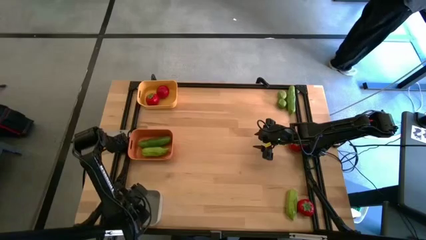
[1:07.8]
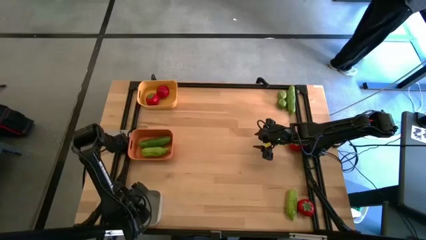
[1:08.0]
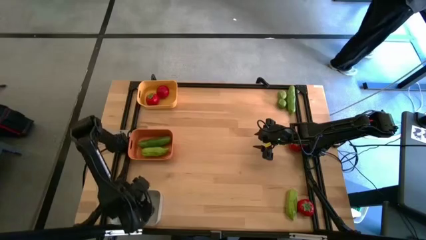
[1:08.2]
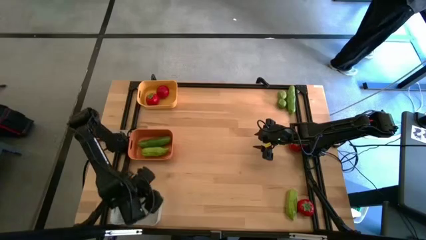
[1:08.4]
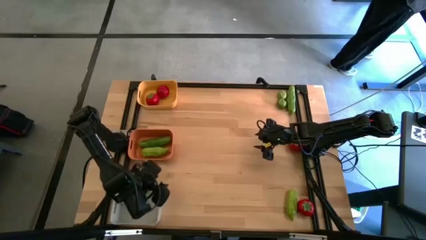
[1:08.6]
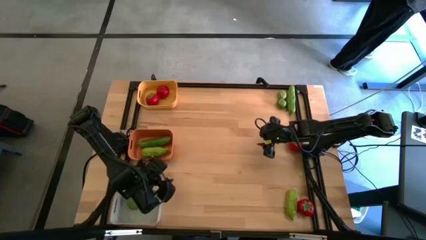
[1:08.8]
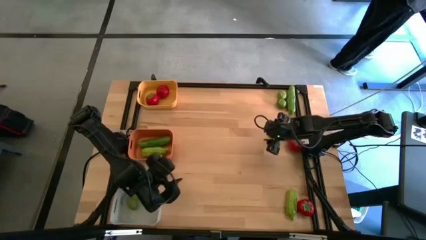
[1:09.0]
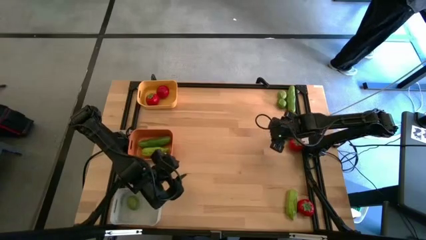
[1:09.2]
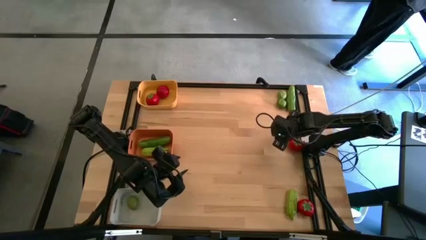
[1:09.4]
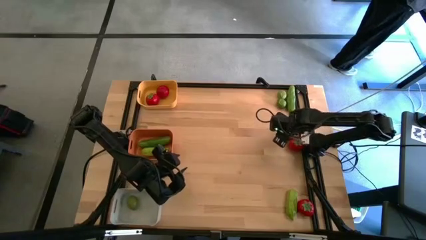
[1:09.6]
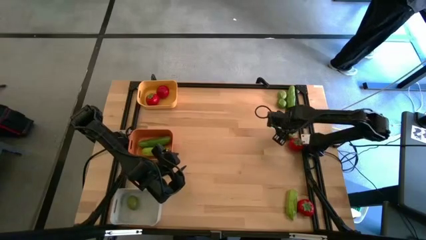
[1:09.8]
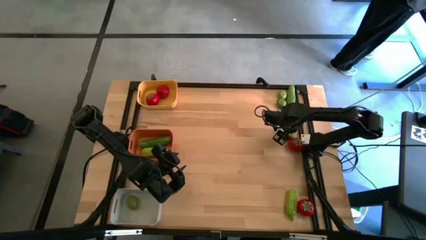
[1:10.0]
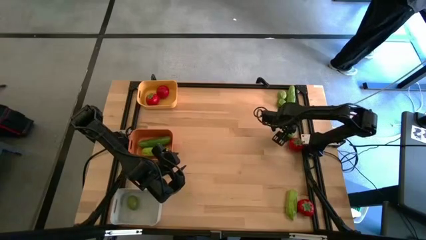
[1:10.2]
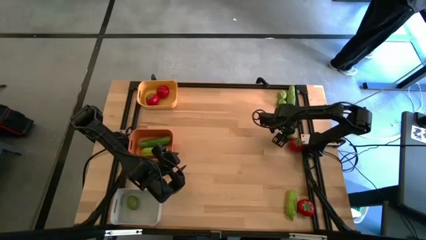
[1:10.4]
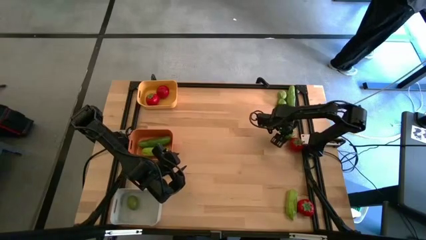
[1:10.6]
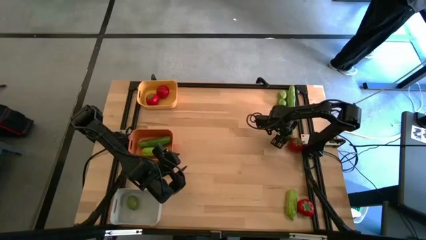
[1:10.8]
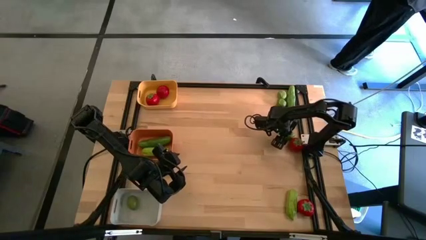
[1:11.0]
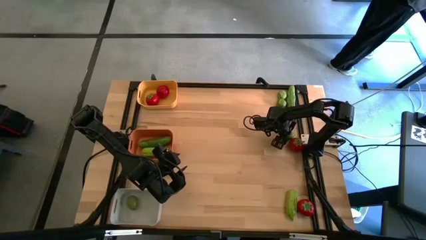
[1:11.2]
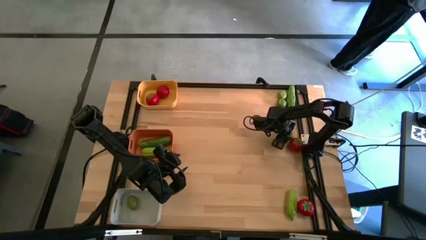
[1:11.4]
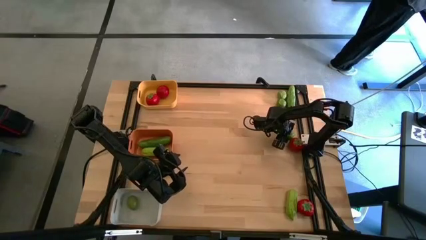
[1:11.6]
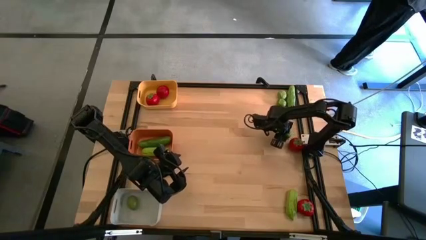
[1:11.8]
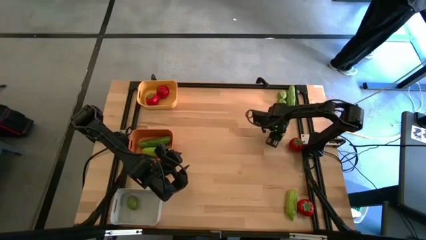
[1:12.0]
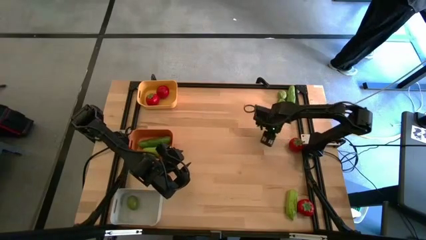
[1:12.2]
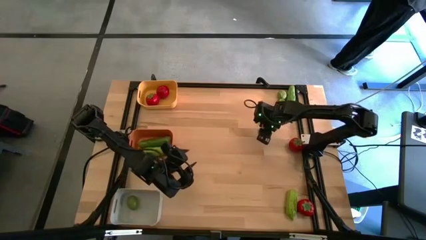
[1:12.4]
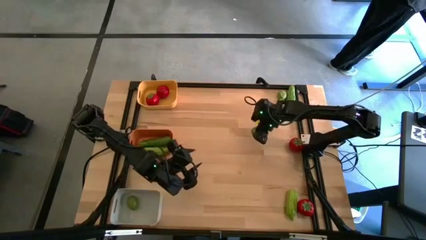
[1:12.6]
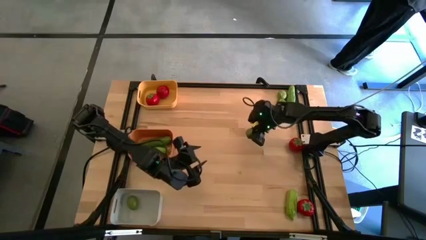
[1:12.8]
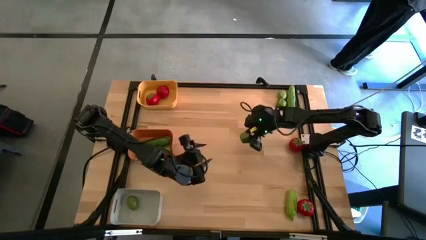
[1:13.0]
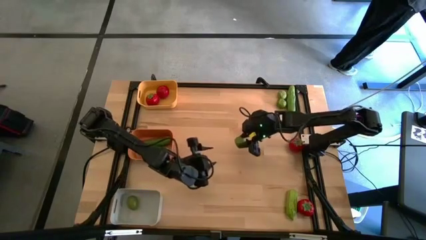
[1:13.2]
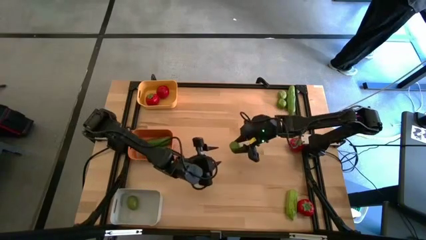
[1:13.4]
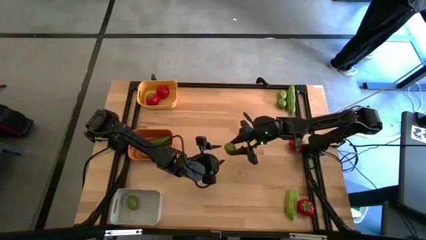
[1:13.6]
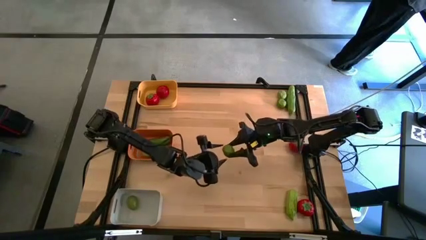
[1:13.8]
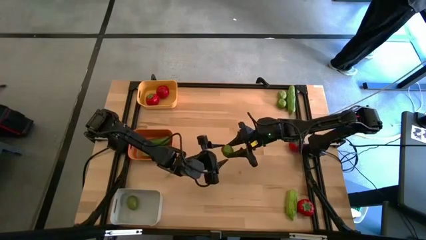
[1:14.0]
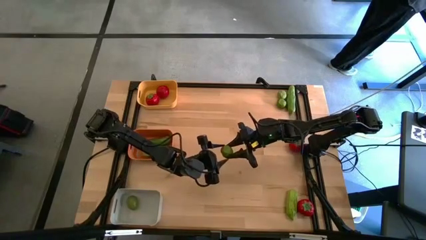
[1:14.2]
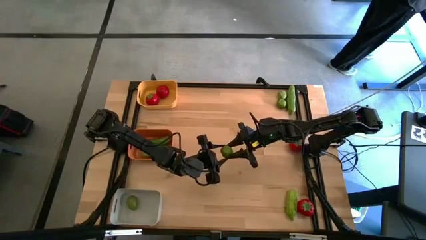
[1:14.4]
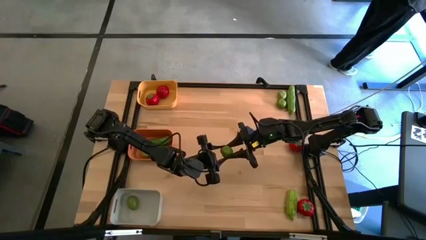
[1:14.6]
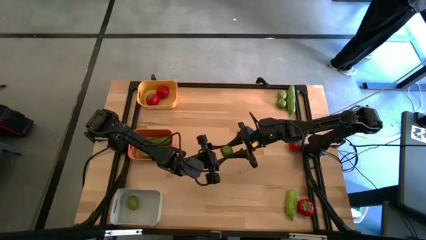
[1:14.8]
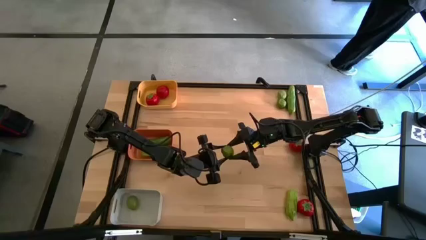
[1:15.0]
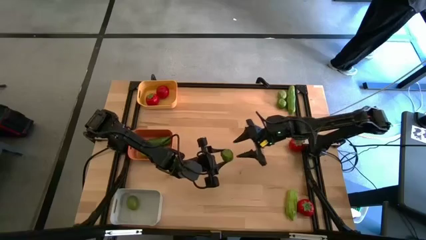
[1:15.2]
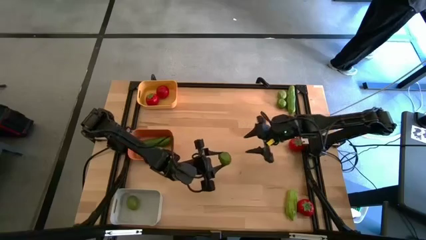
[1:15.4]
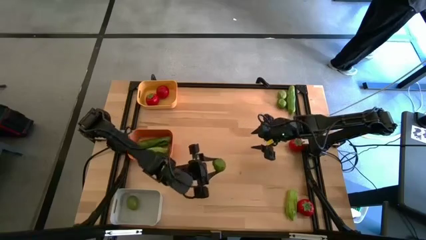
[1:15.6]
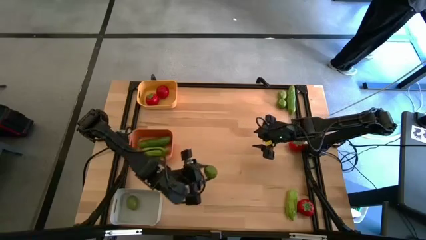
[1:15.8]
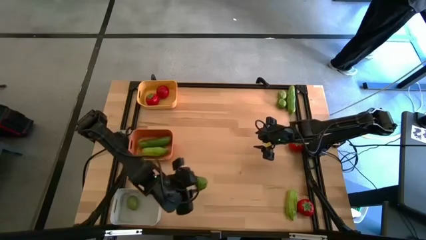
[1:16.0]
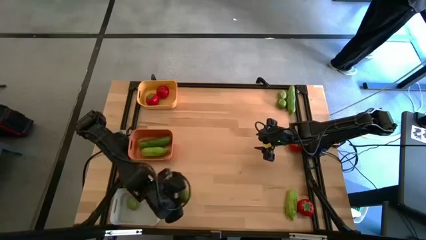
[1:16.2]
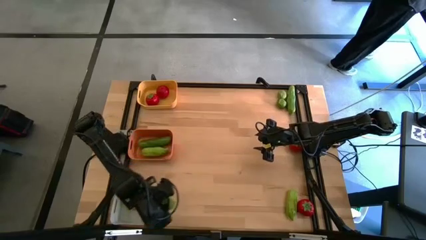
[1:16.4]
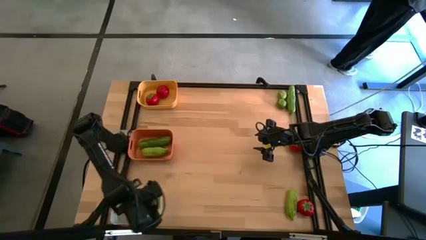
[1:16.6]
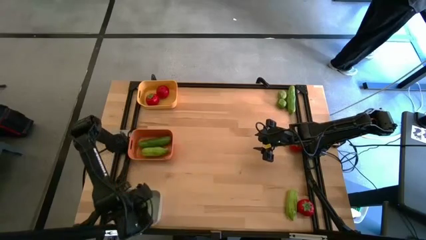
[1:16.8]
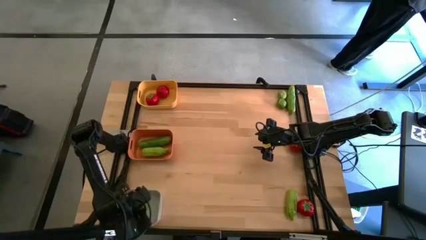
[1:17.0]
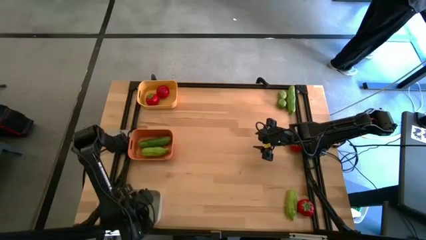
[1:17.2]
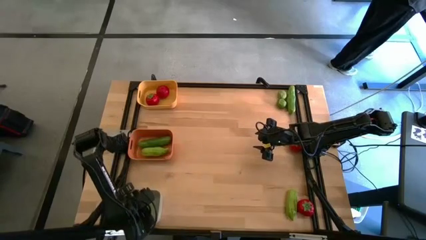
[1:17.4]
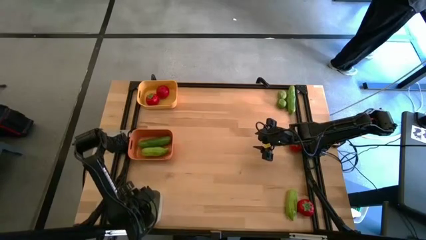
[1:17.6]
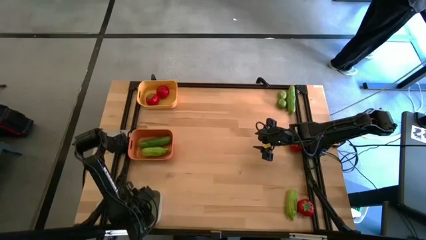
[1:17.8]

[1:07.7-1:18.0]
Task: Sort produce into baskets
Put the lime into the gray bin

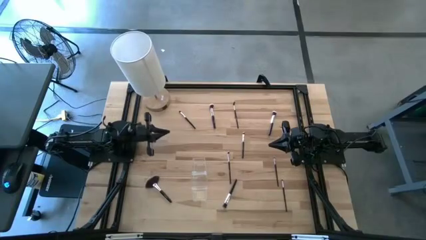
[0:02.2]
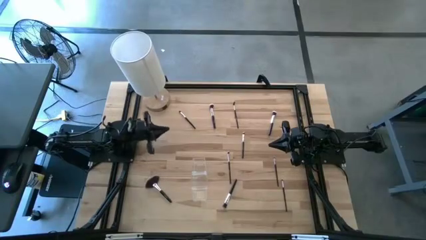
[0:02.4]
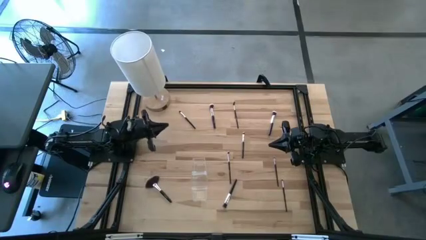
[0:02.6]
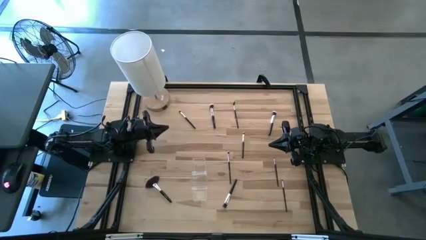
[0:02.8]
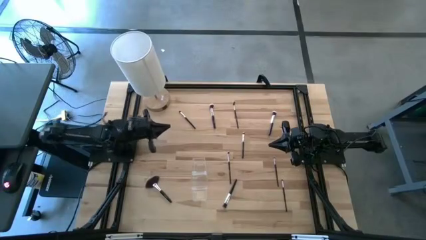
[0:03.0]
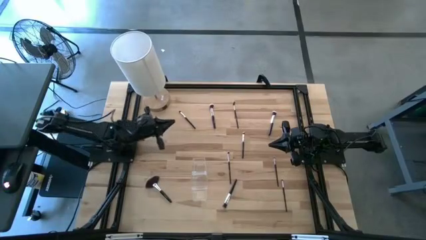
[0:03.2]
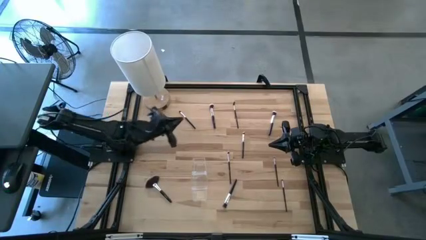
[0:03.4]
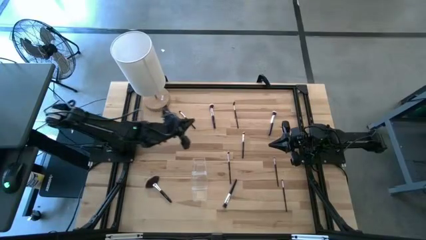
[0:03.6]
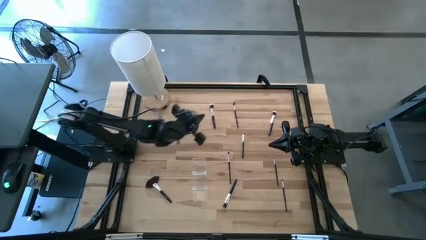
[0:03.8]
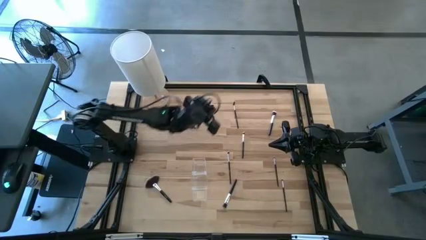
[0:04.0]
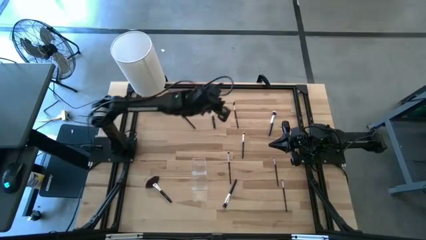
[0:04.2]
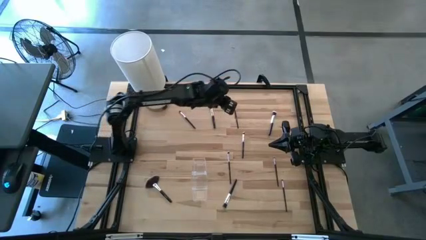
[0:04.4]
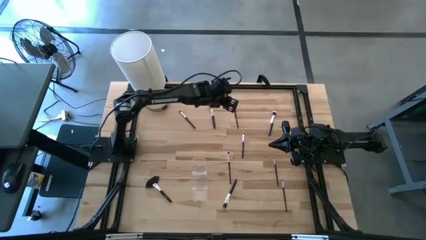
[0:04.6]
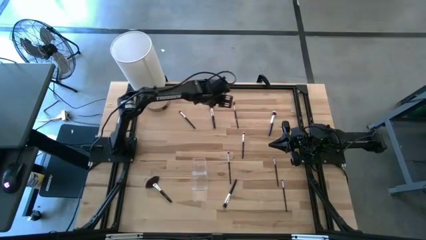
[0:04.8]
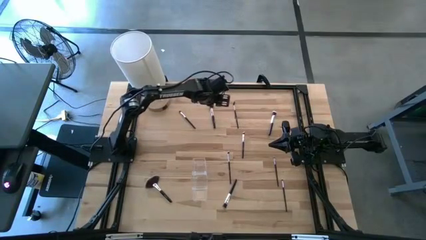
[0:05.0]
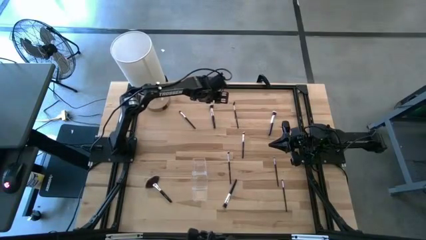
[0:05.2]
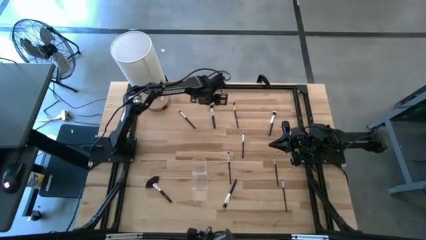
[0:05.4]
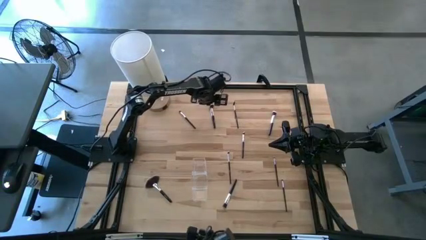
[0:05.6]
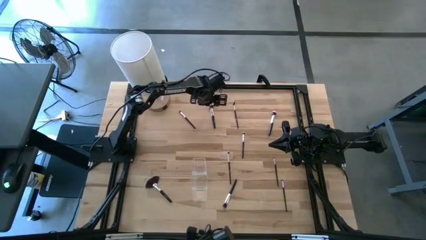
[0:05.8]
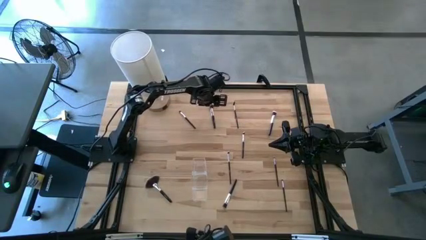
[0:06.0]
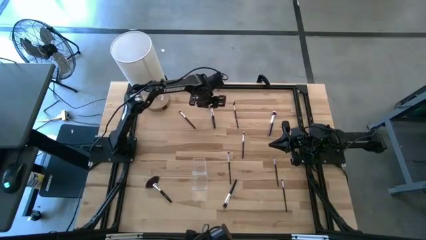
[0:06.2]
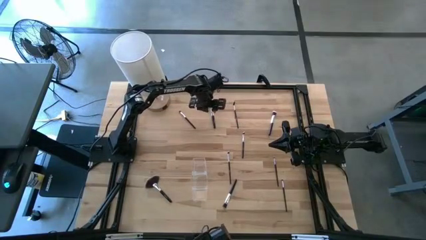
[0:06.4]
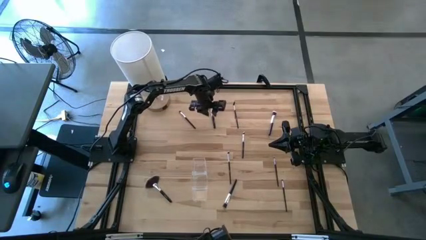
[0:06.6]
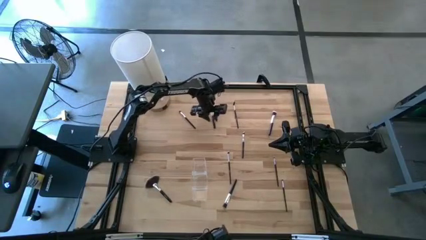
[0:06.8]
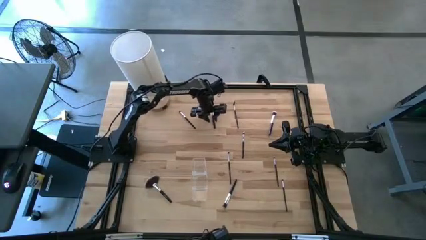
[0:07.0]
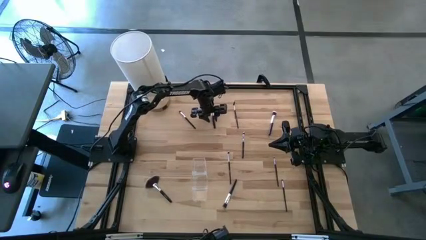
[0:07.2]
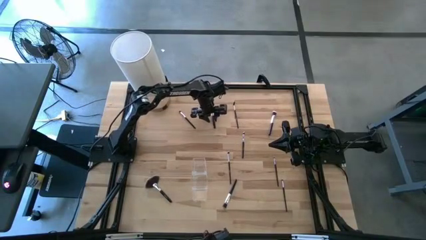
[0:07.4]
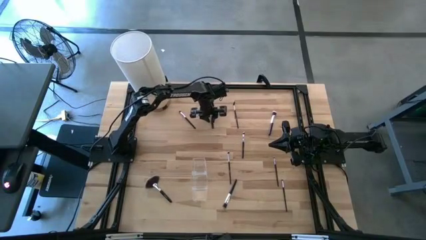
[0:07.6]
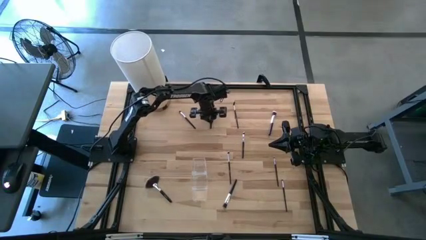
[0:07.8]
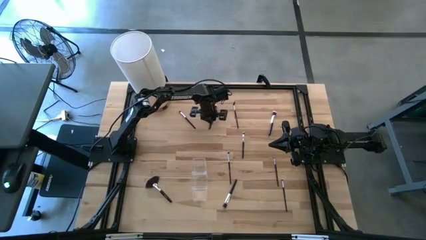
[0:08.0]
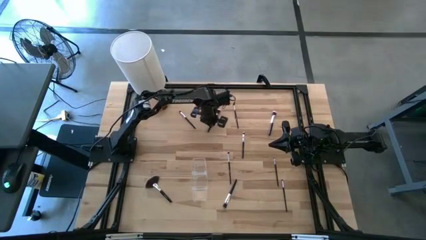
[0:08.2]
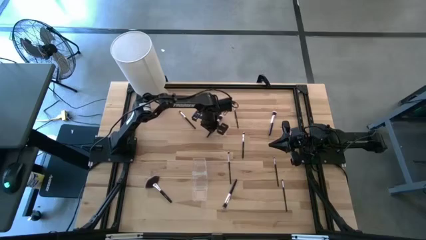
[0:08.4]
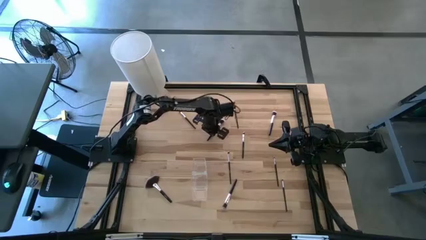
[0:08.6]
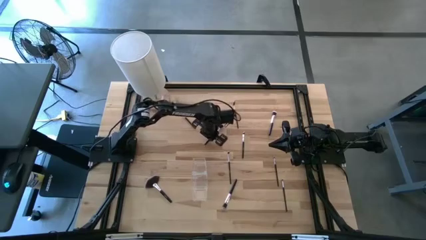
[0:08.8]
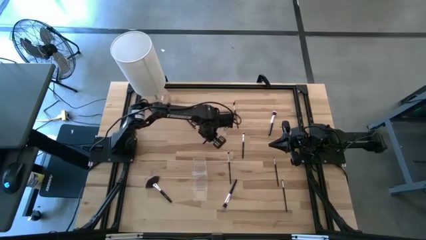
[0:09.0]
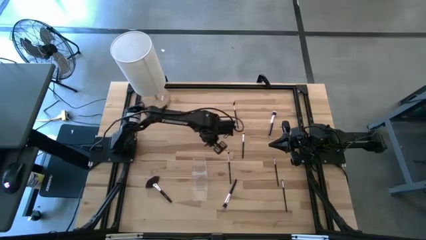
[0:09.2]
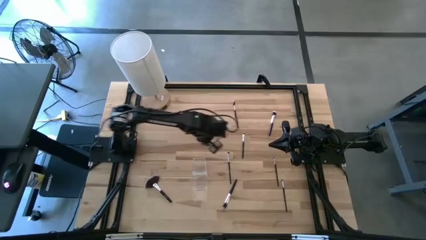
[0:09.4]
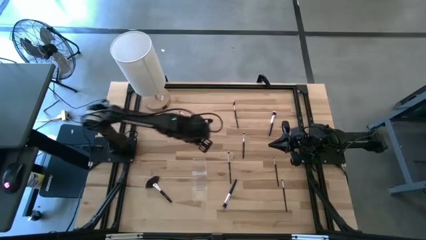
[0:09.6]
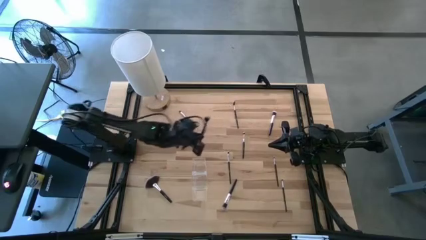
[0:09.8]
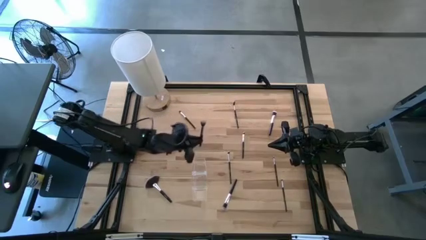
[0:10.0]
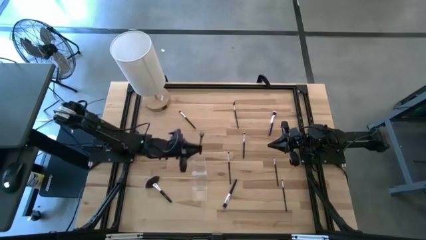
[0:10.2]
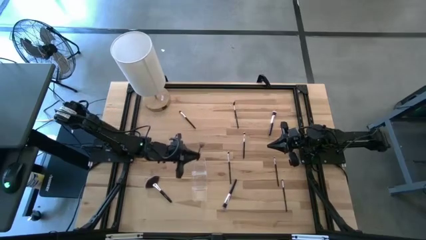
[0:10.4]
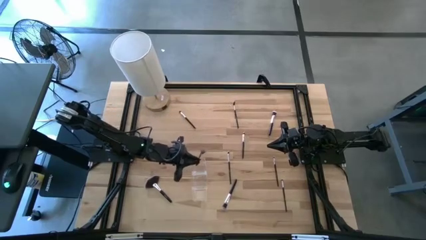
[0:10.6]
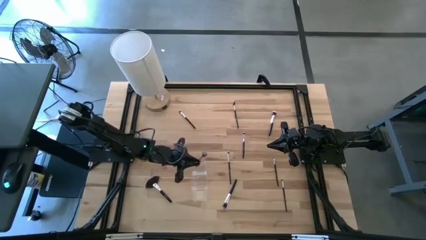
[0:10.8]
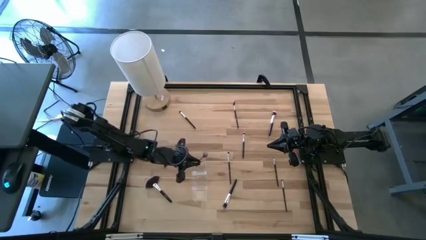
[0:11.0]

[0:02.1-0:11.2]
Task: Put items in baskets/containers
Put the powder brush into the transparent organizer
